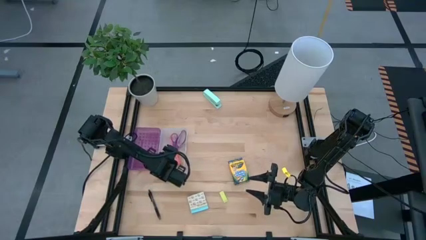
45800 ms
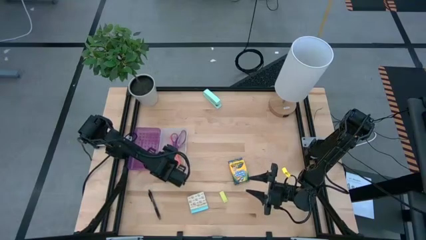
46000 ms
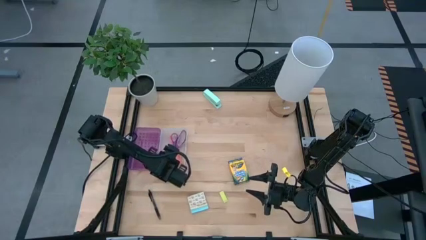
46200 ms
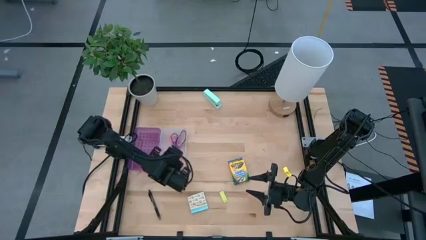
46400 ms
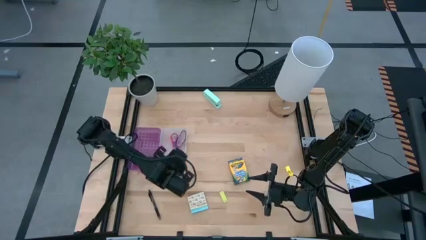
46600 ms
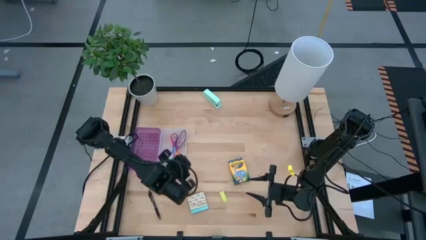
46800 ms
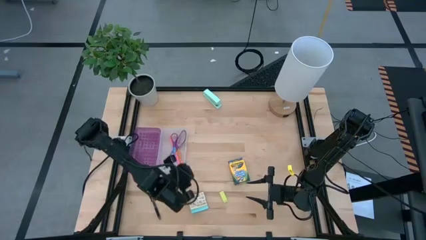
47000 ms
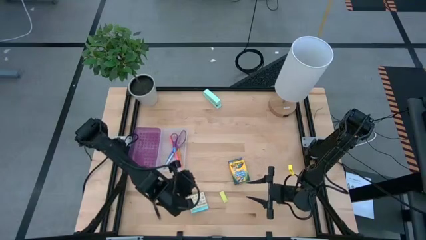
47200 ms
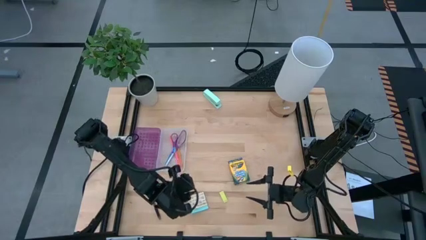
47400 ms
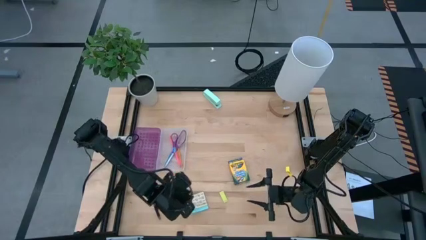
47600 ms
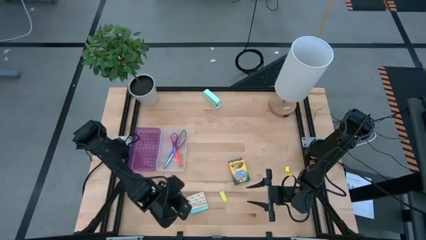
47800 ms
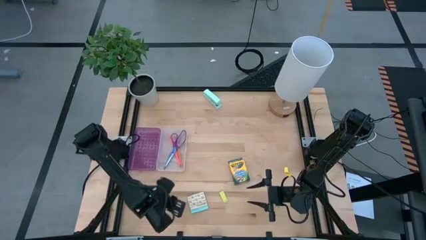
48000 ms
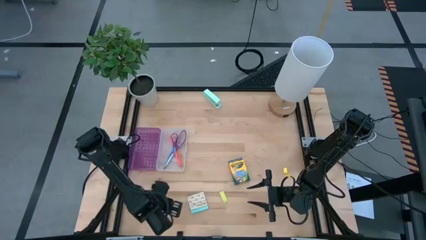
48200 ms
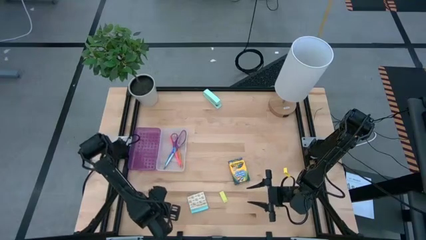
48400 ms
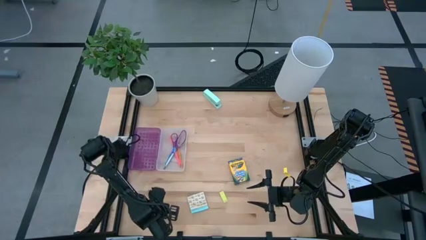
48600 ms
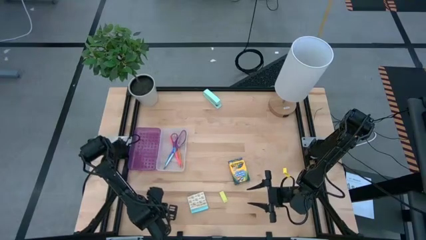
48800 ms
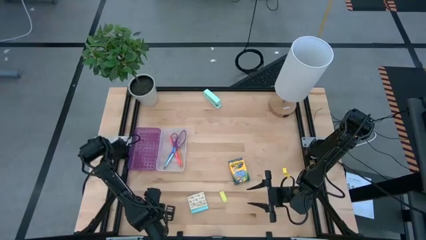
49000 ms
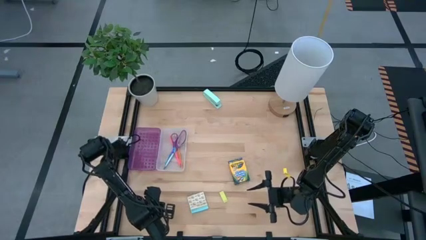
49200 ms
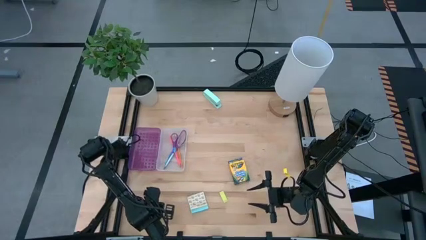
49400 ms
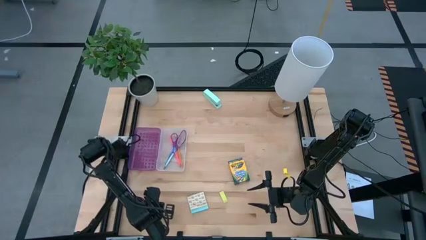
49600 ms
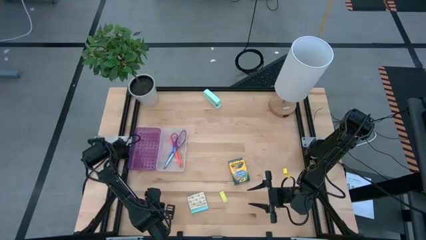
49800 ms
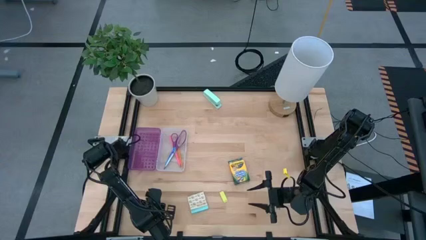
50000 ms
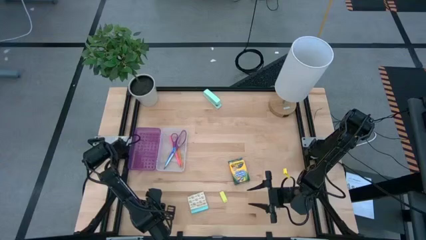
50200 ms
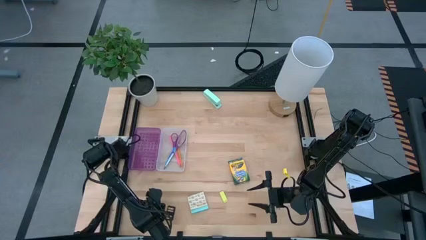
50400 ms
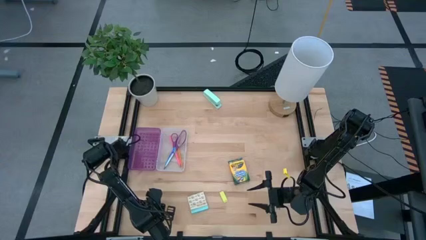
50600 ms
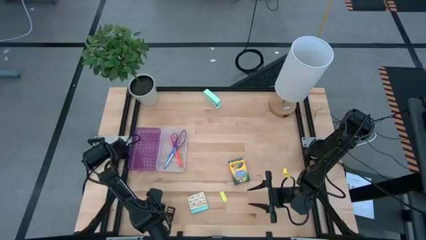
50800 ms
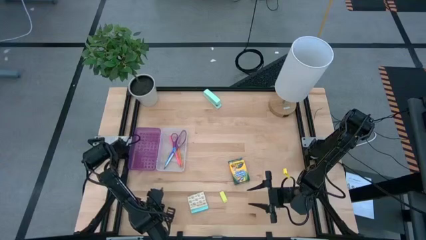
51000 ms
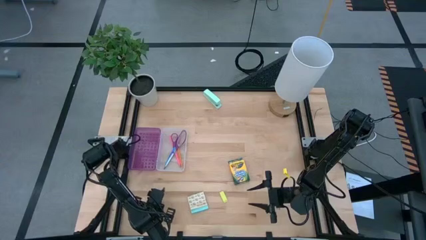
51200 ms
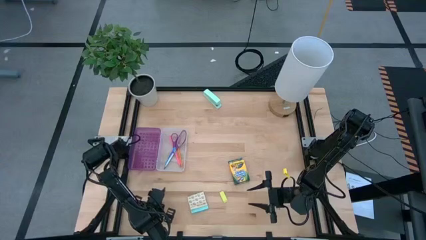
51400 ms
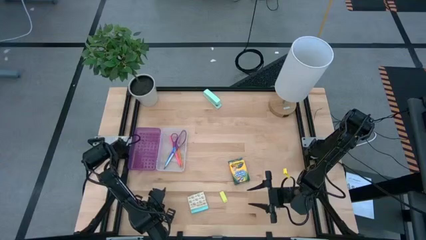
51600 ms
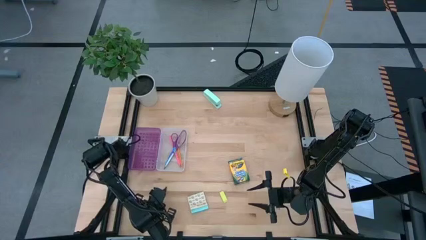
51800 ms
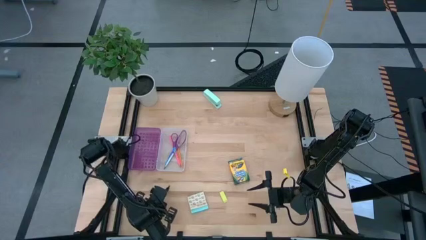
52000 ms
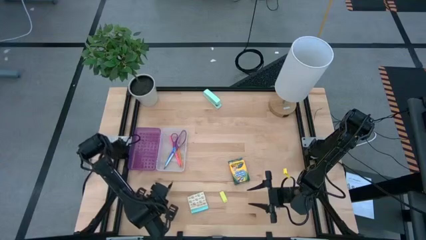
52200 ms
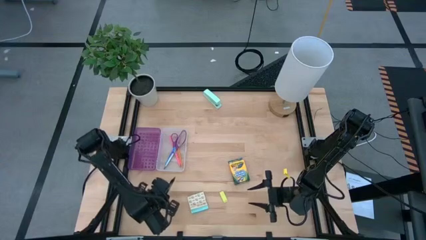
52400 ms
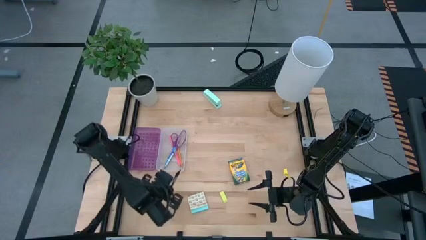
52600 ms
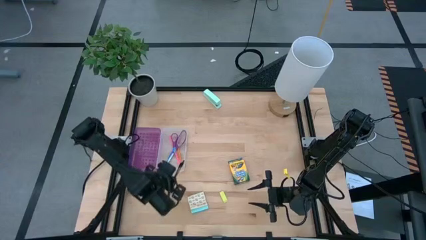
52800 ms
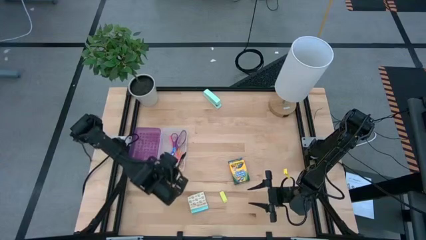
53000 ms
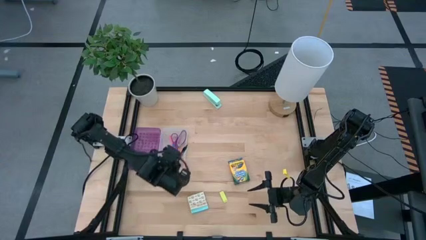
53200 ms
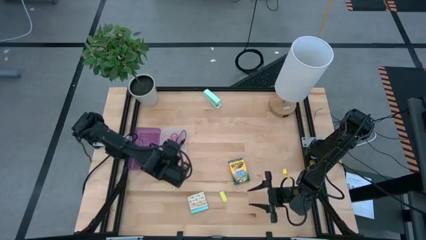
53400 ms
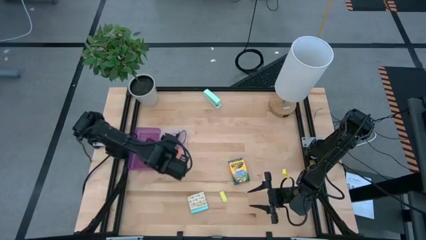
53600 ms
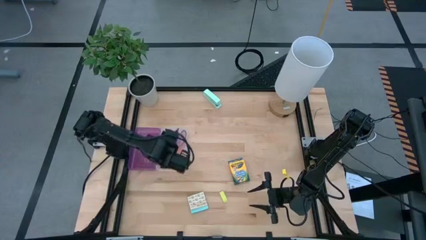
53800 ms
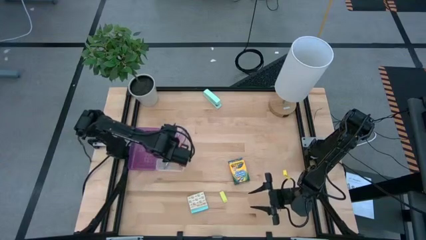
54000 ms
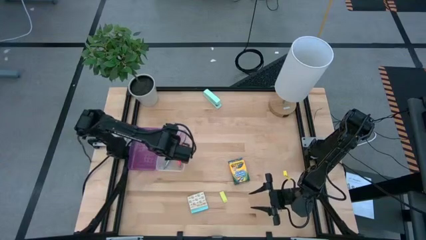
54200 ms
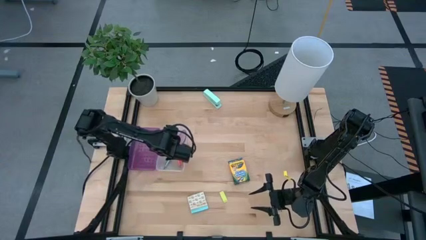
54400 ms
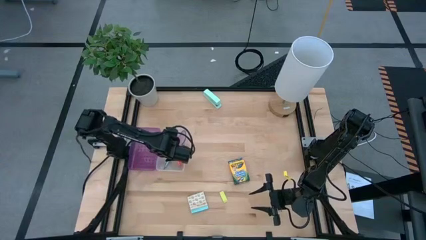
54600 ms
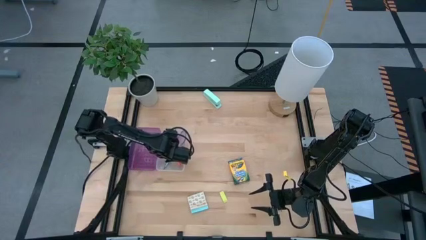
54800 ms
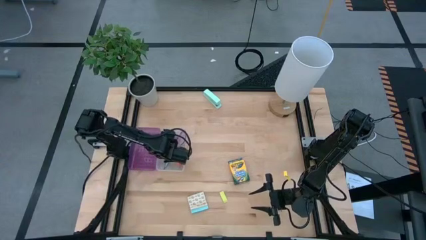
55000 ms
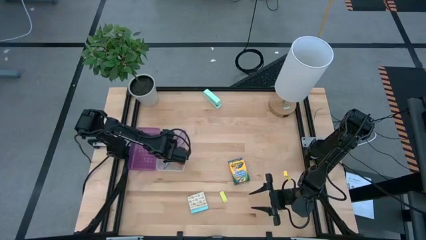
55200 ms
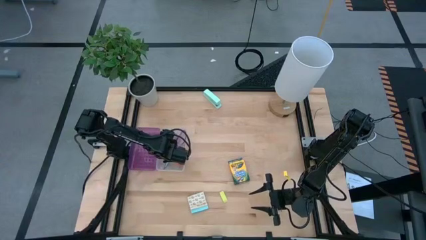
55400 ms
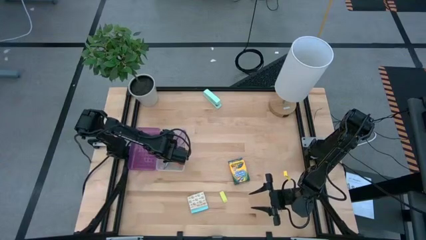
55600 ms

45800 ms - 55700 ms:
Task: Pack school essentials
Put the black pen into the purple supply box

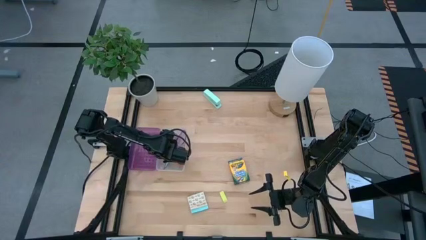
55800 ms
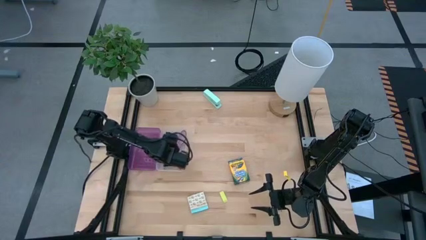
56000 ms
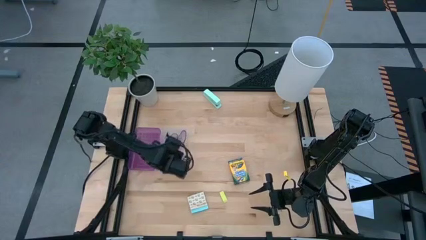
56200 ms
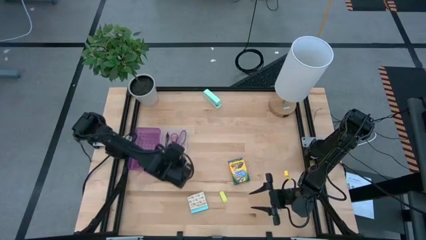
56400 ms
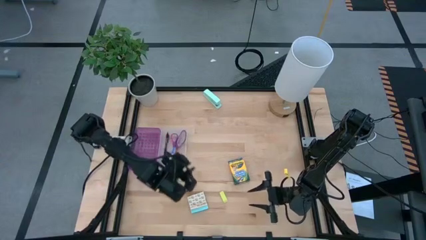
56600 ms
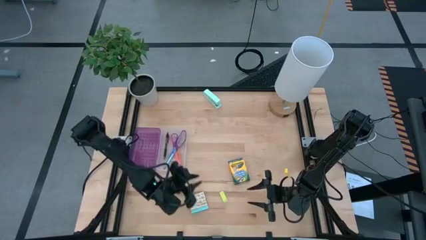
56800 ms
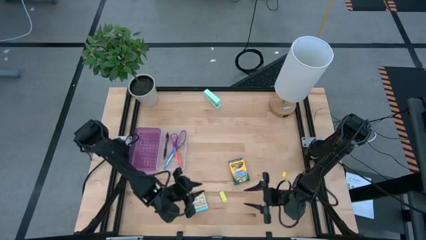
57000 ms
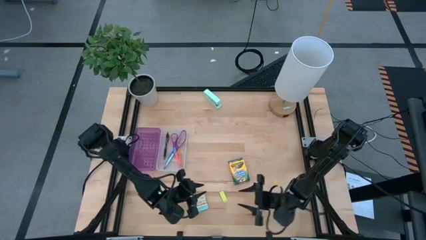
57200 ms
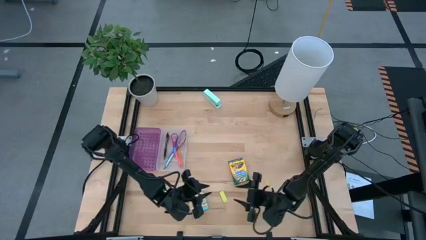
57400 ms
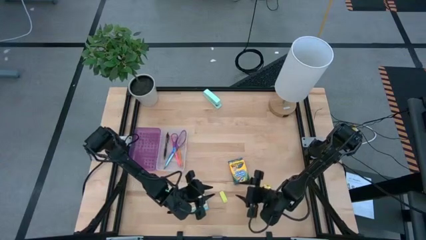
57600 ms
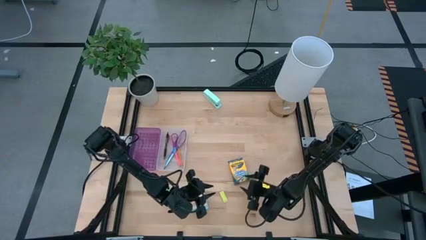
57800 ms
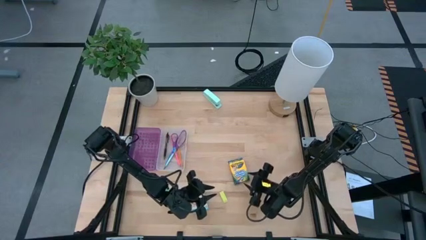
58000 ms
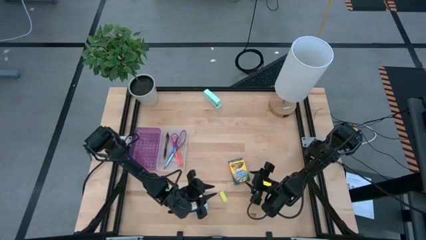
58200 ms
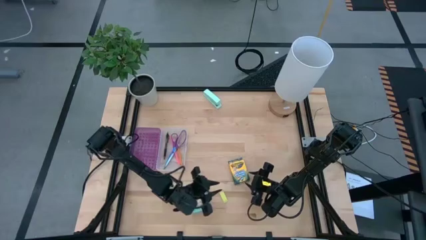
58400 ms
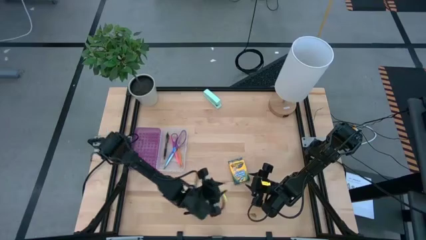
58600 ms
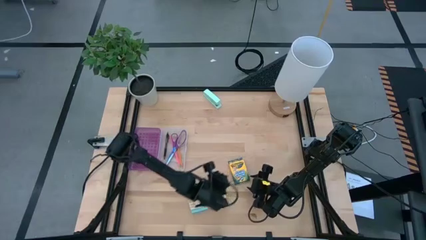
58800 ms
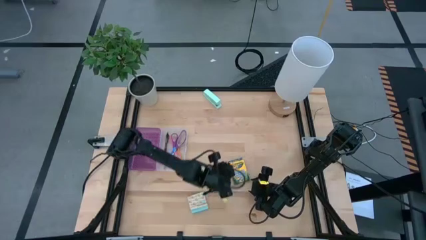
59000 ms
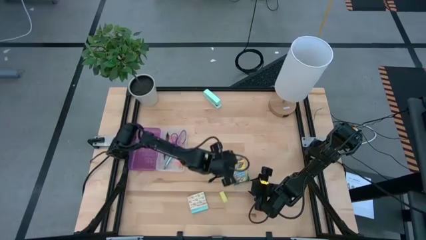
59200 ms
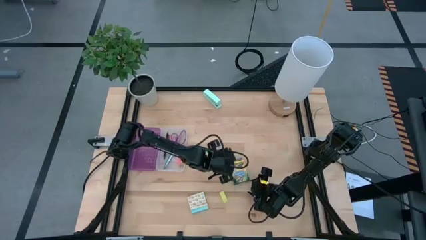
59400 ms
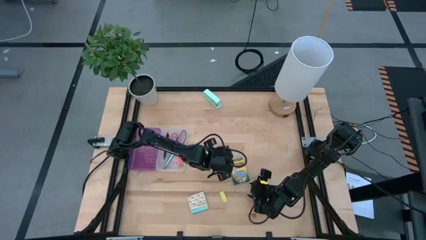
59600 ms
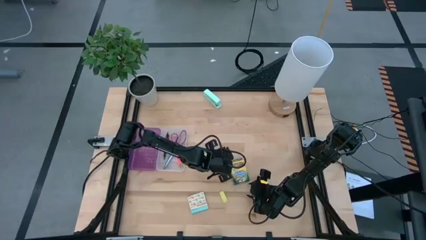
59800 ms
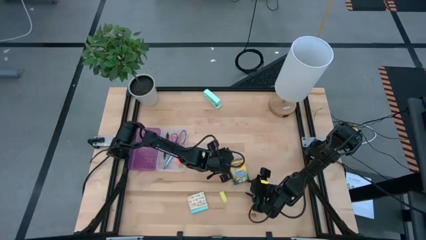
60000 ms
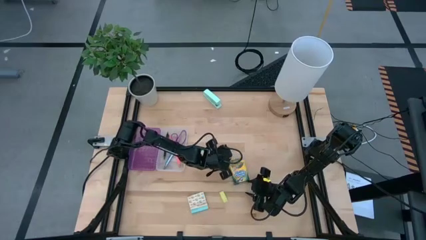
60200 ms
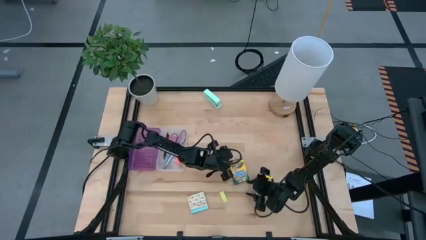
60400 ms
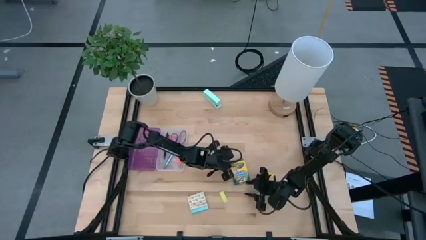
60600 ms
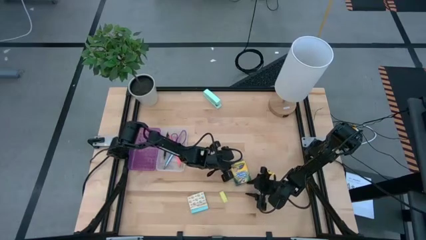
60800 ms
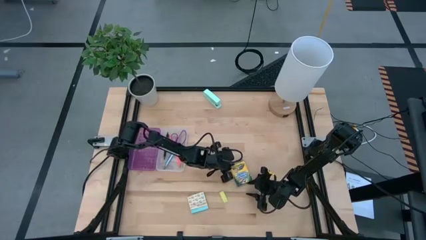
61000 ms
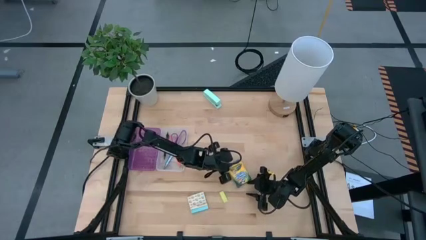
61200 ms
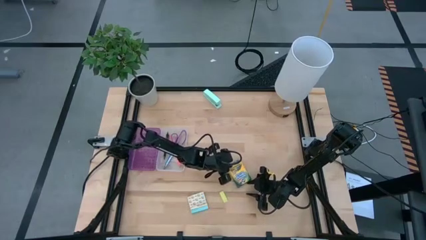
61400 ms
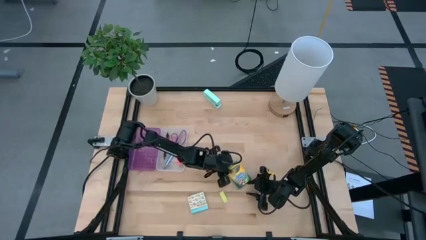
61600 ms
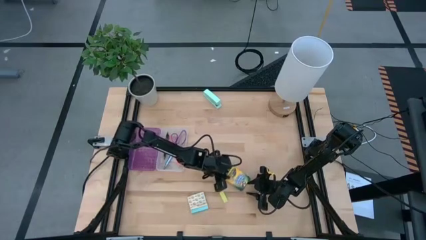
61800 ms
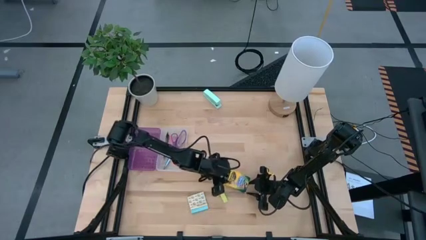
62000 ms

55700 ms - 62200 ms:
Put the crayon box into the purple supply box
